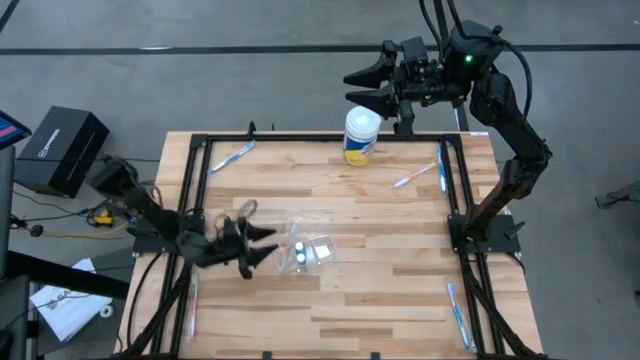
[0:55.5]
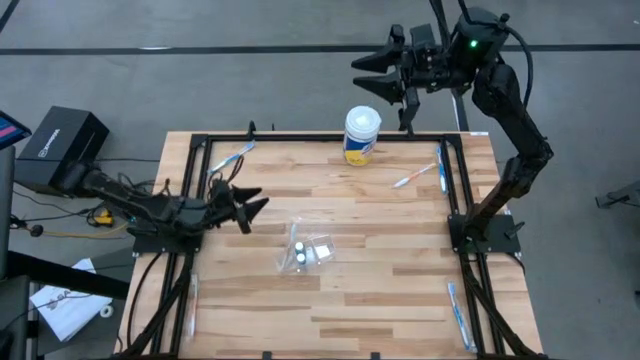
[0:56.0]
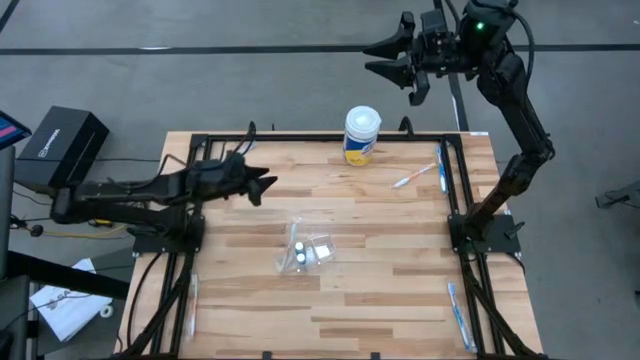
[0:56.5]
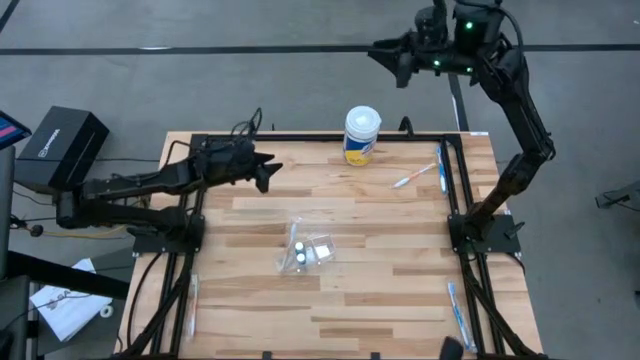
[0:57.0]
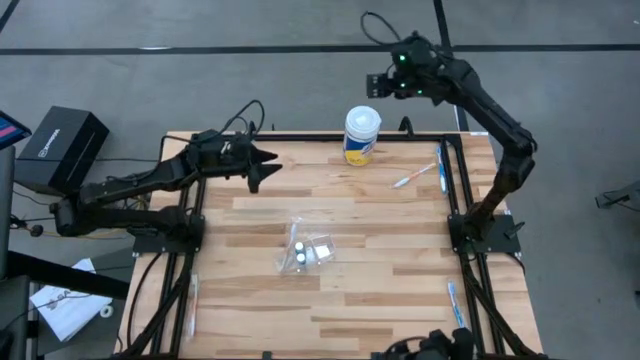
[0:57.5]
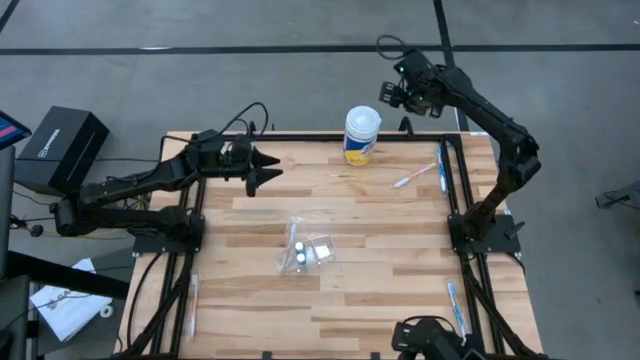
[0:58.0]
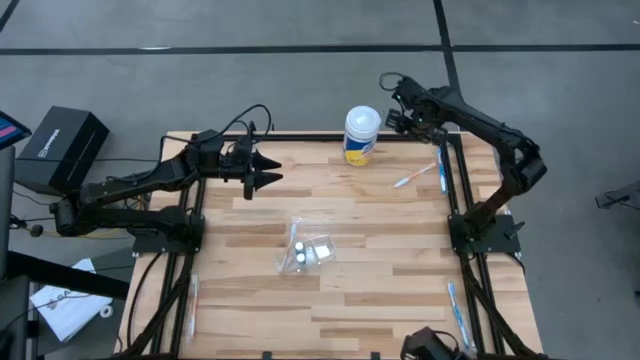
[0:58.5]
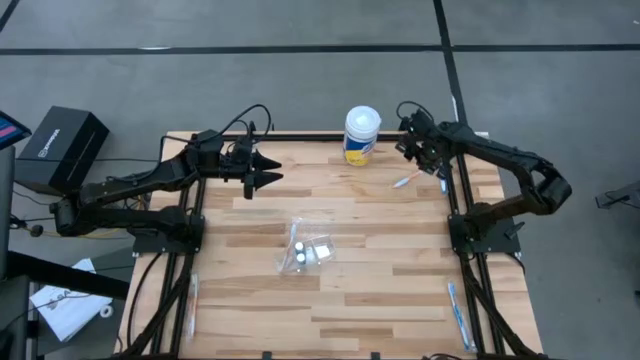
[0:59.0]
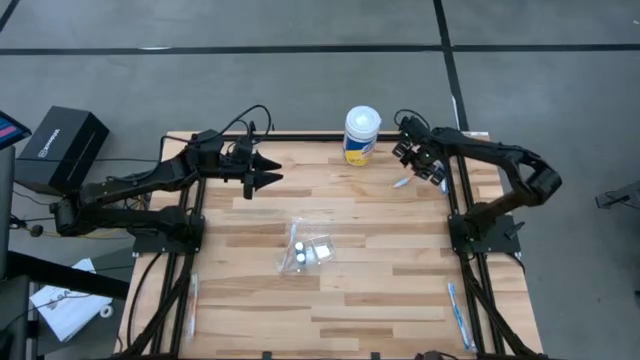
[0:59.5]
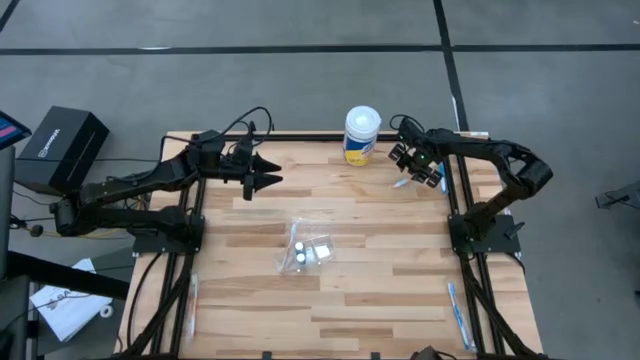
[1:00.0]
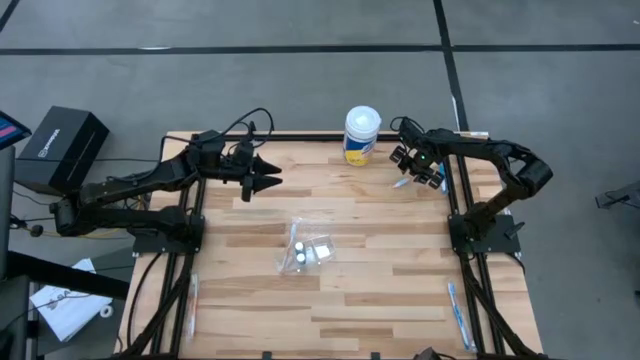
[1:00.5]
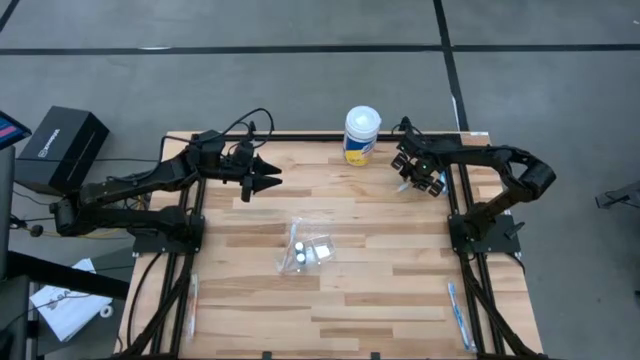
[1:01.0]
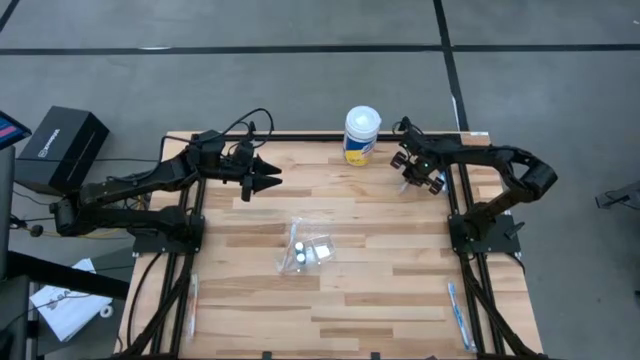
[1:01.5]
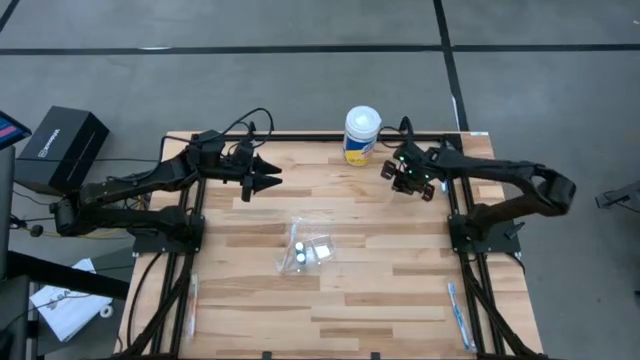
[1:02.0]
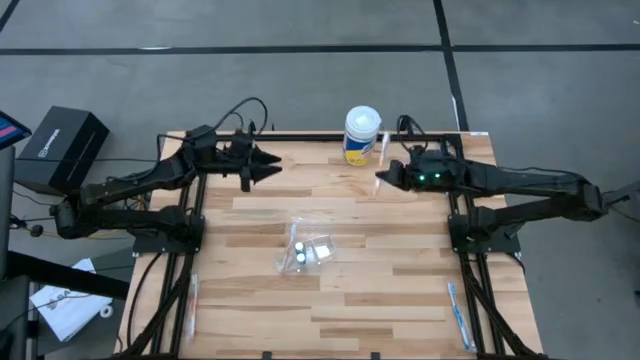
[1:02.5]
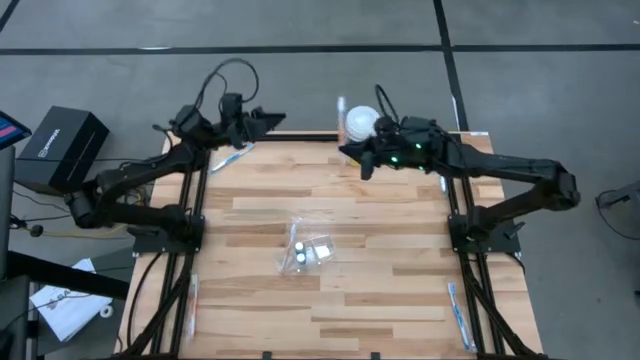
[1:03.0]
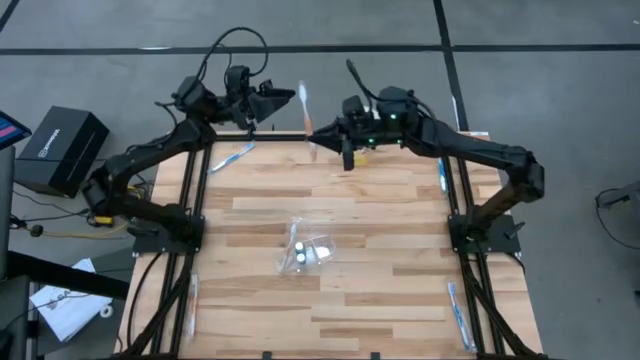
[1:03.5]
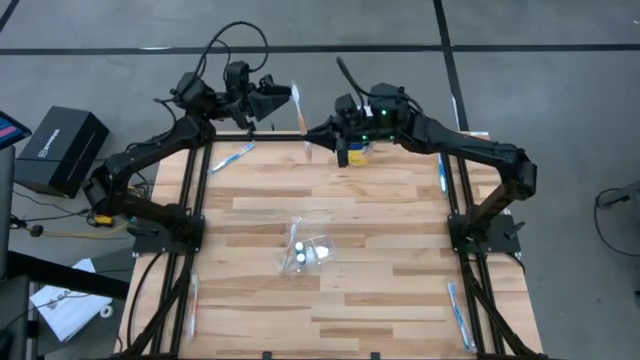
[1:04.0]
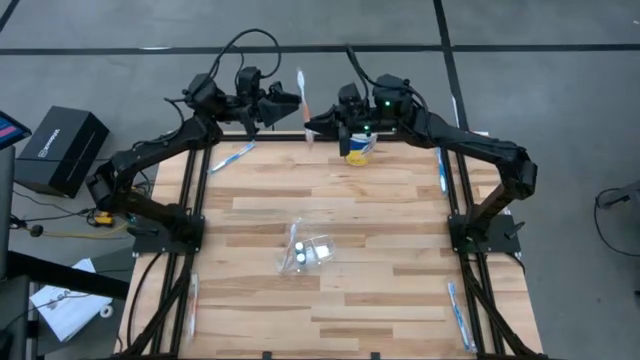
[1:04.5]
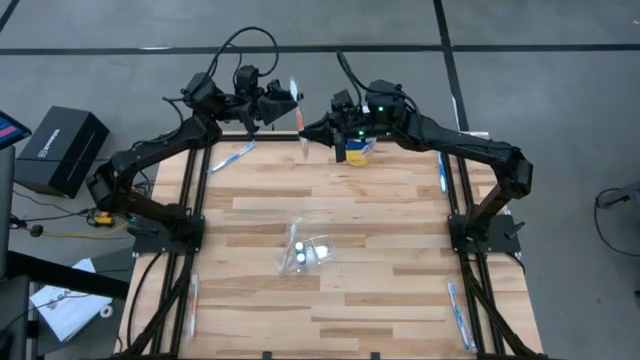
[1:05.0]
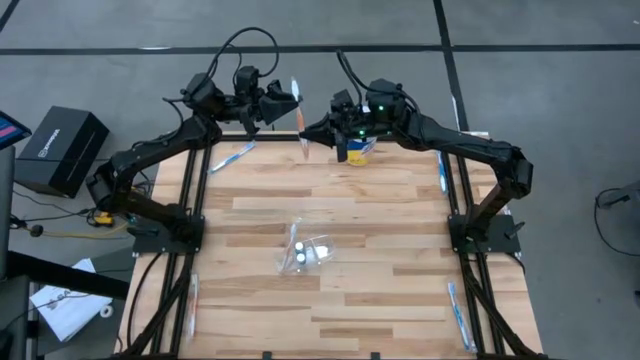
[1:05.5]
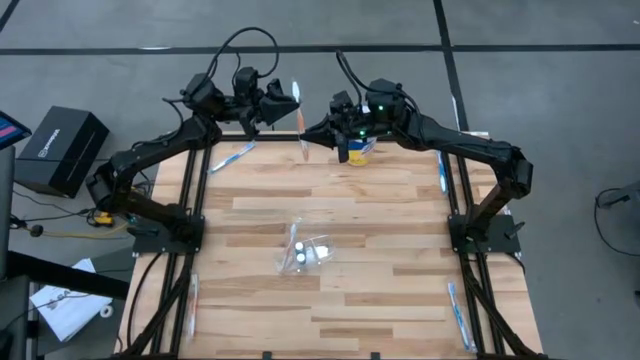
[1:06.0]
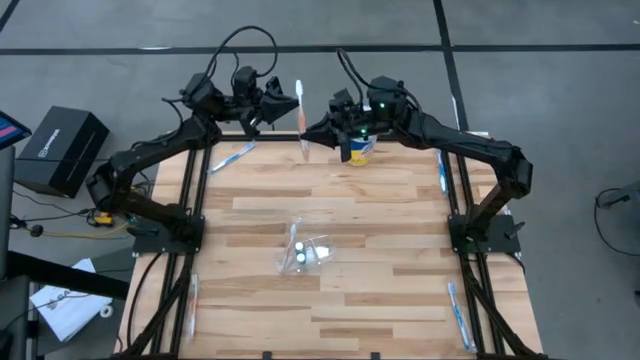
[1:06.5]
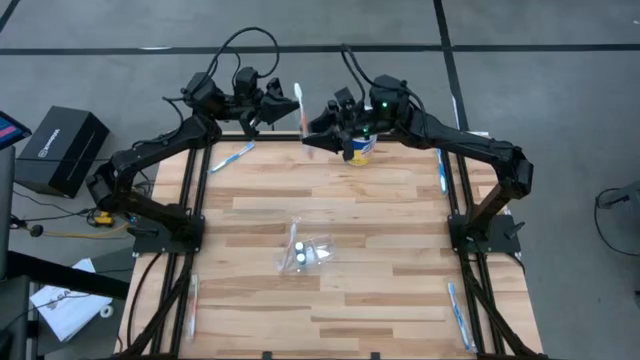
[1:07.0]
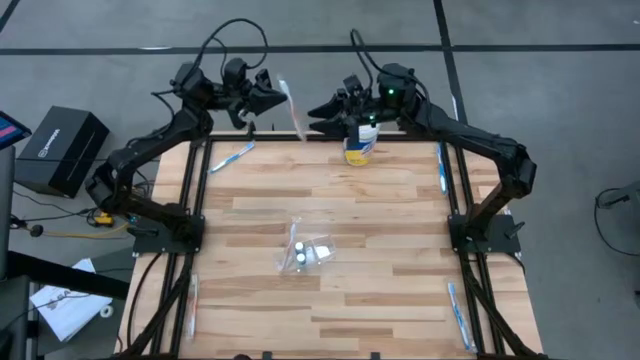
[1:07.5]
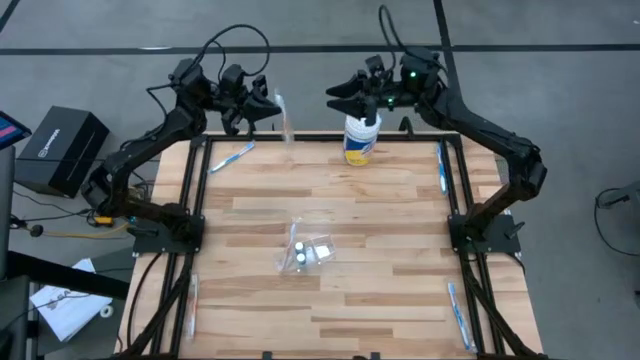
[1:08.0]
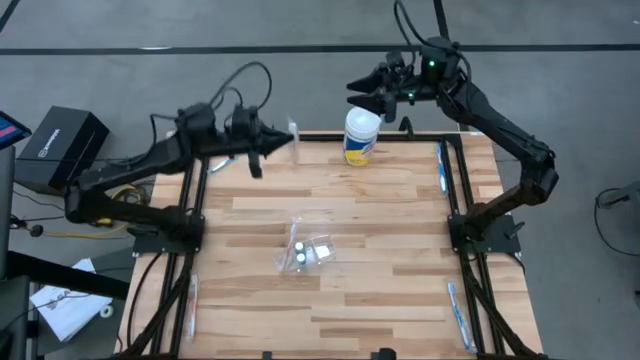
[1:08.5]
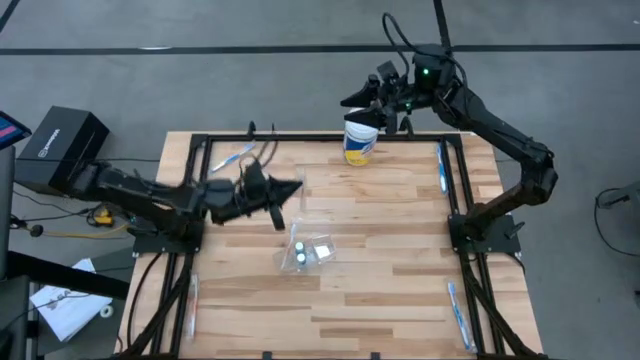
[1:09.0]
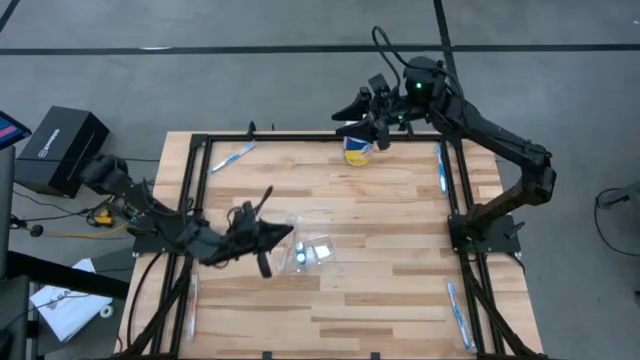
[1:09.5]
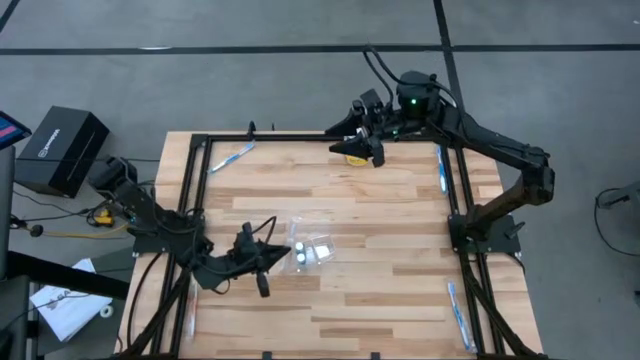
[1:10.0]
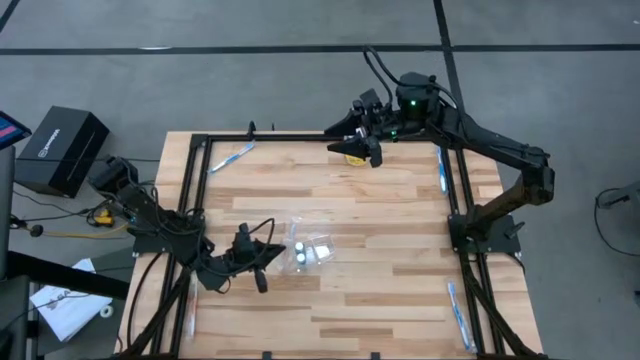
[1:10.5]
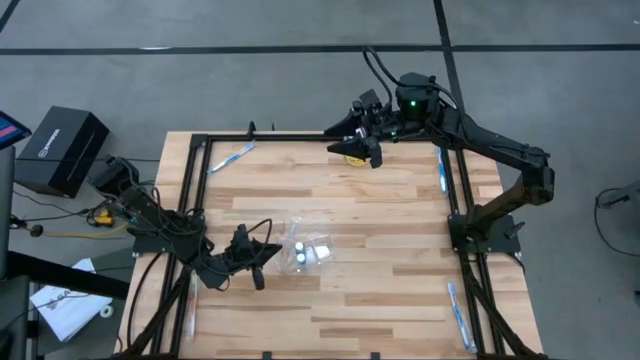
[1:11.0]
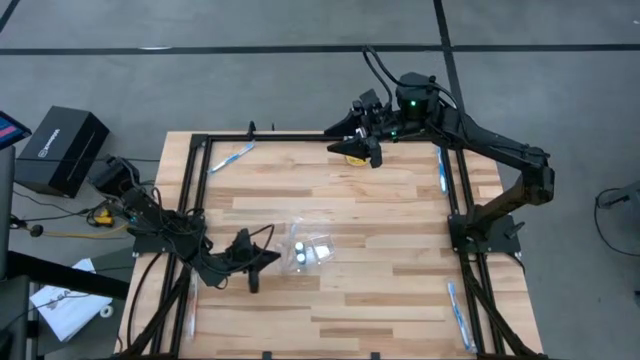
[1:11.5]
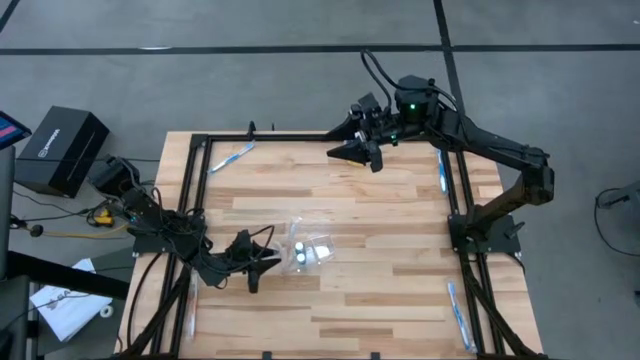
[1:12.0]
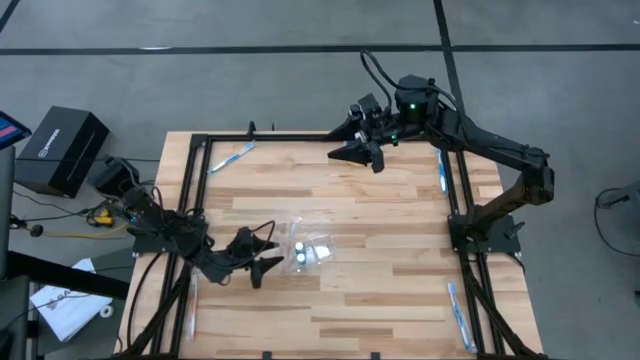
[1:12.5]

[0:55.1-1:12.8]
Task: Pick & Place toothbrushing station
Put the right orange toothbrush into the transparent organizer

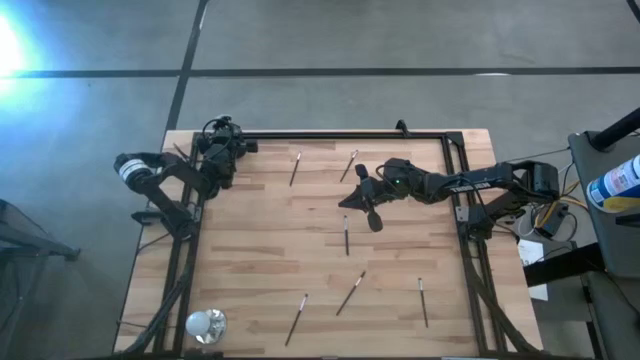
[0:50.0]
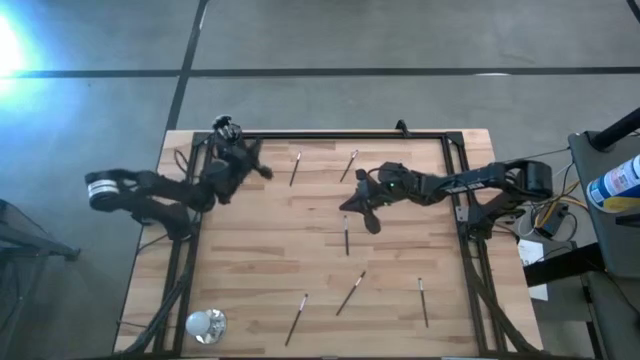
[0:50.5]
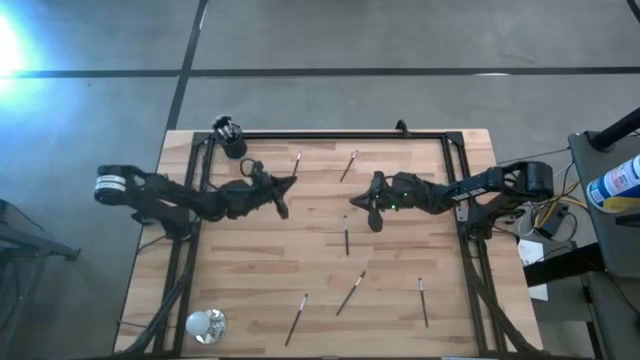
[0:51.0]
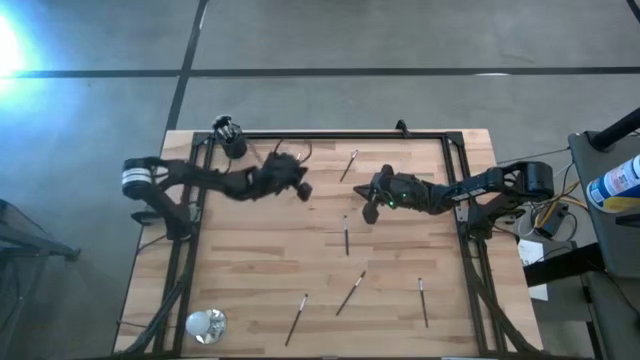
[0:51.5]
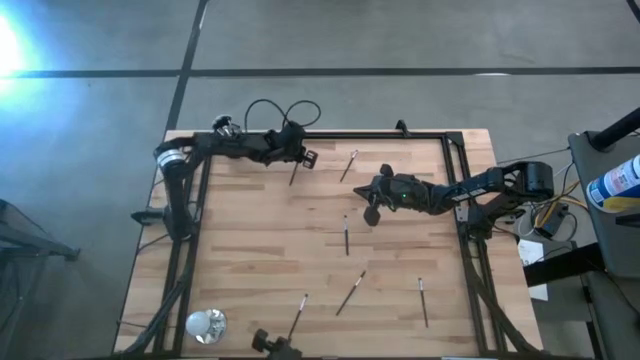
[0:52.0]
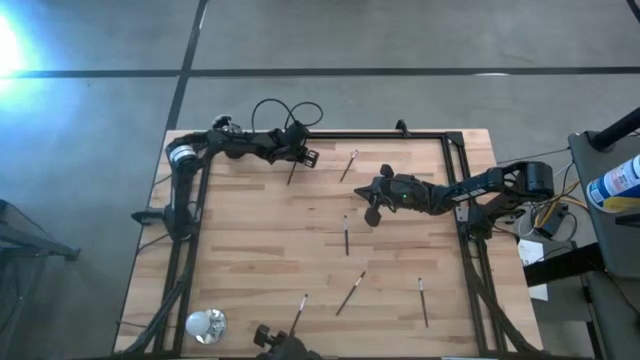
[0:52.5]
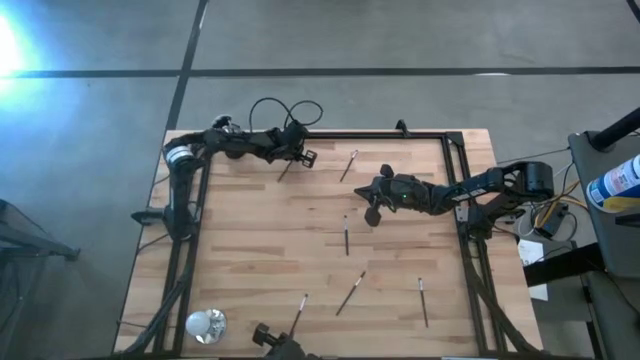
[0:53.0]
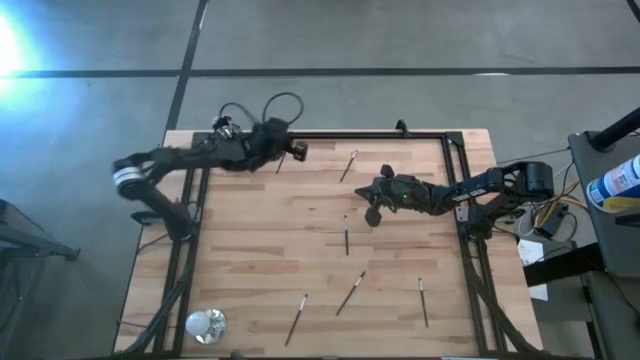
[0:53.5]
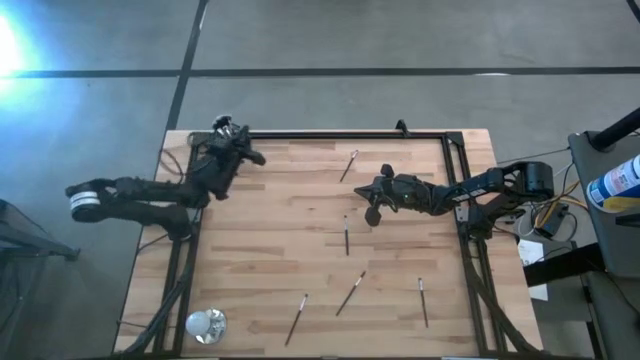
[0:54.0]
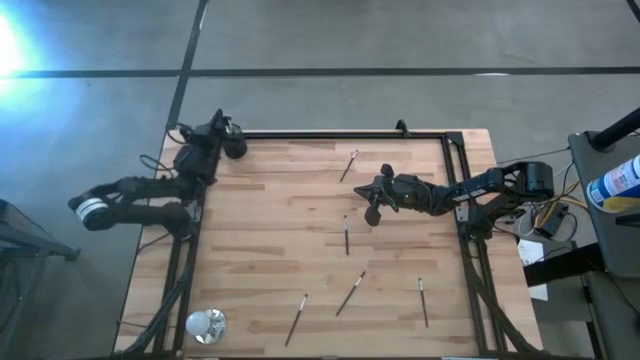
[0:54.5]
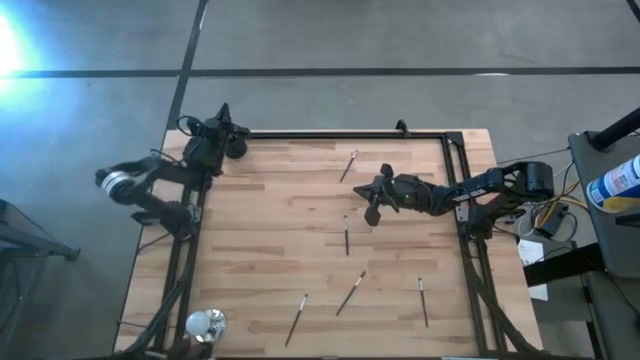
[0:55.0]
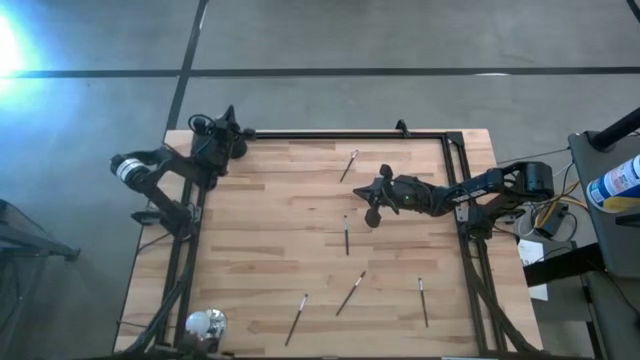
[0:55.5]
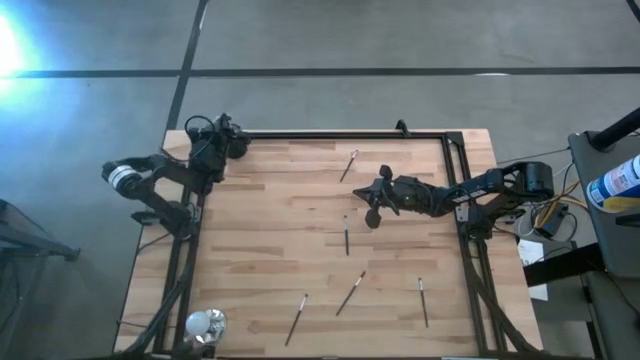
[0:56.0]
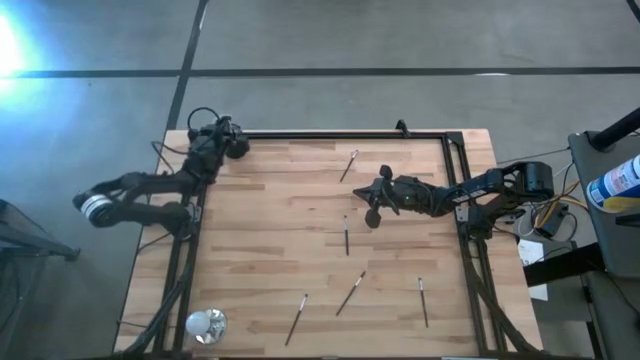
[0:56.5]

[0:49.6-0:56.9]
Task: Put items in baskets/containers
Put the black eyeshadow brush into the black pen holder
